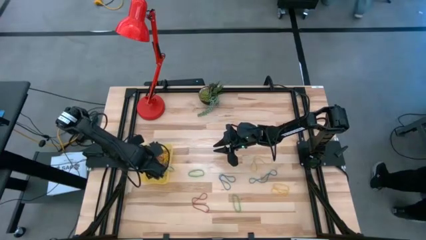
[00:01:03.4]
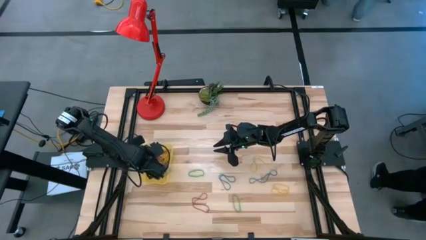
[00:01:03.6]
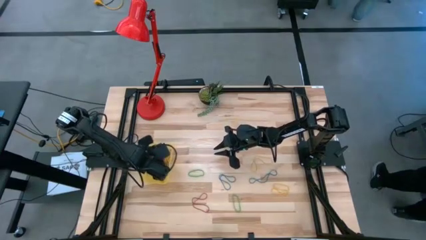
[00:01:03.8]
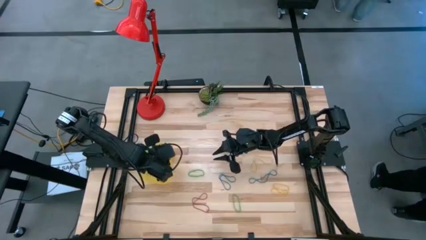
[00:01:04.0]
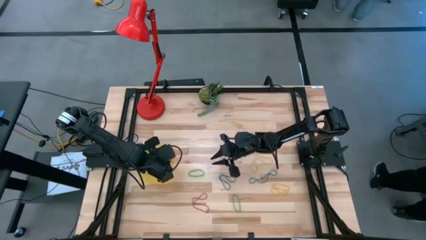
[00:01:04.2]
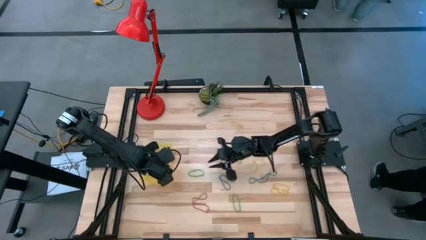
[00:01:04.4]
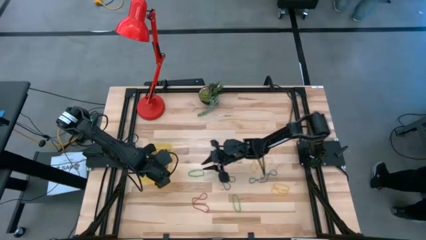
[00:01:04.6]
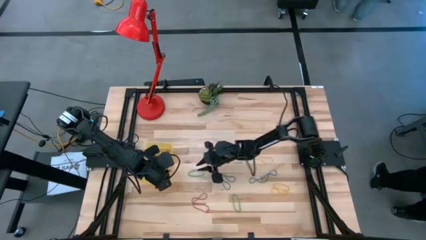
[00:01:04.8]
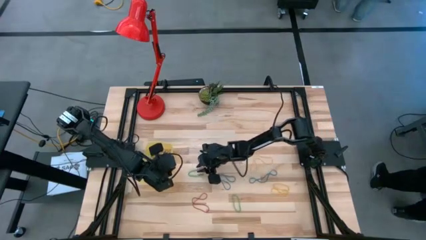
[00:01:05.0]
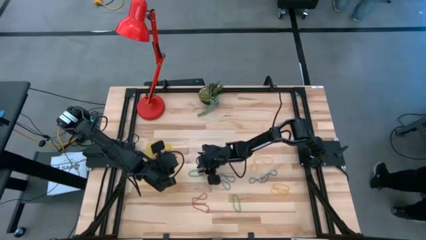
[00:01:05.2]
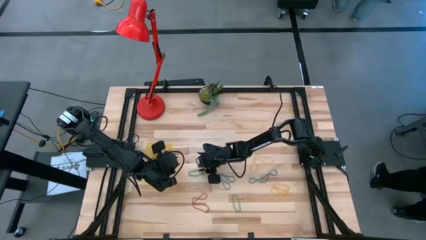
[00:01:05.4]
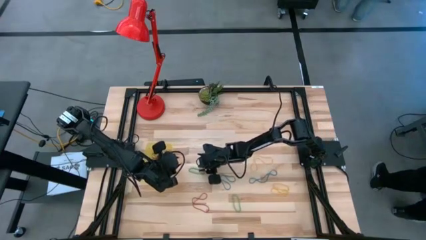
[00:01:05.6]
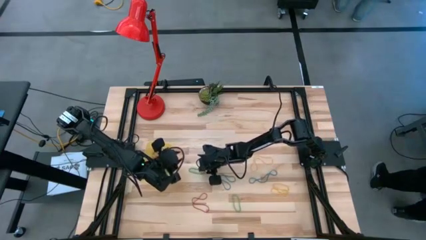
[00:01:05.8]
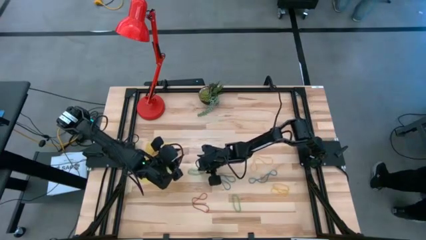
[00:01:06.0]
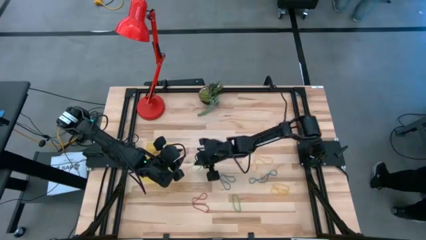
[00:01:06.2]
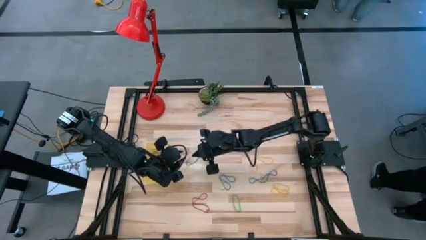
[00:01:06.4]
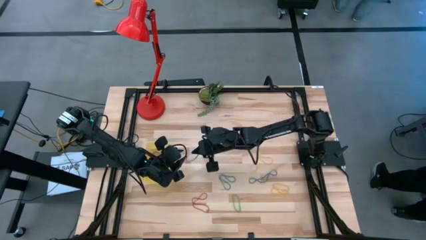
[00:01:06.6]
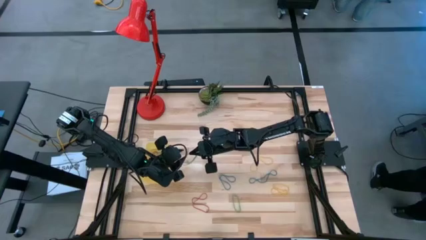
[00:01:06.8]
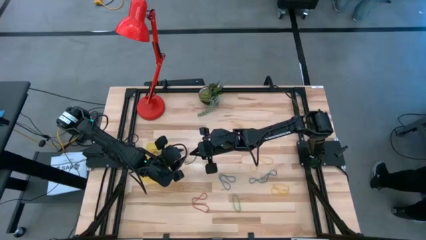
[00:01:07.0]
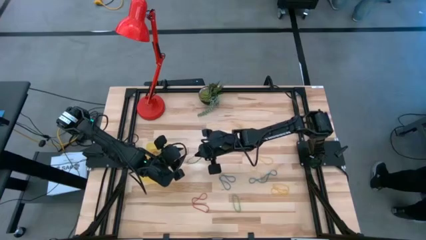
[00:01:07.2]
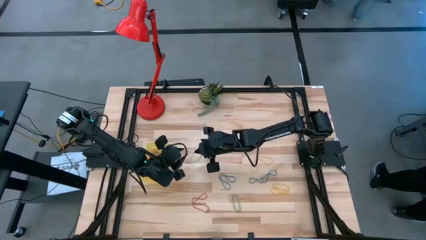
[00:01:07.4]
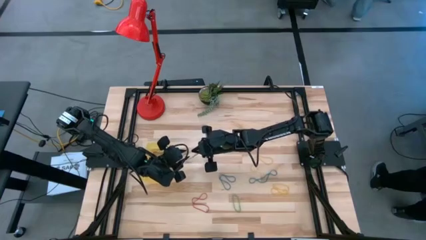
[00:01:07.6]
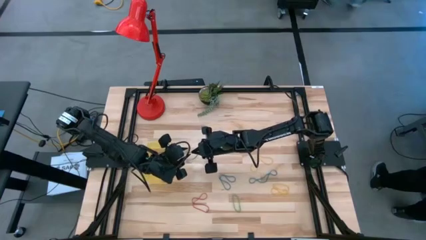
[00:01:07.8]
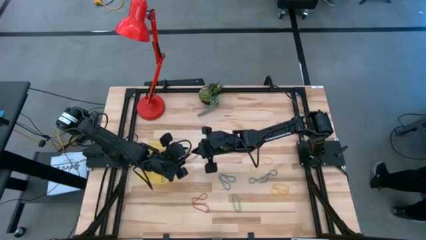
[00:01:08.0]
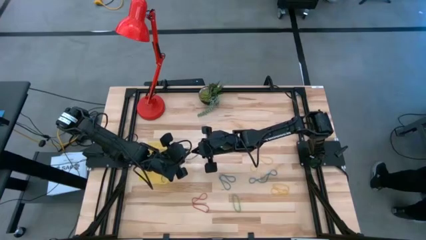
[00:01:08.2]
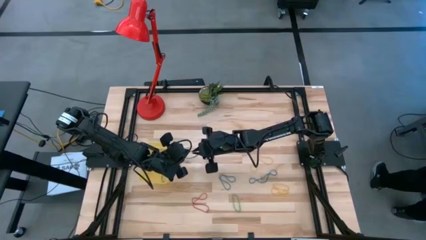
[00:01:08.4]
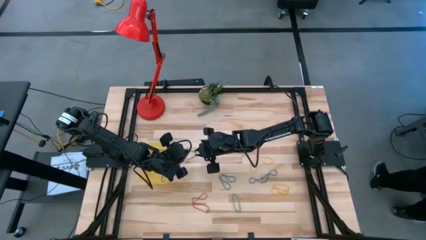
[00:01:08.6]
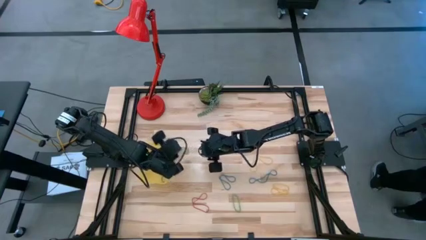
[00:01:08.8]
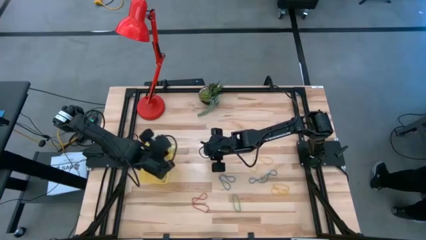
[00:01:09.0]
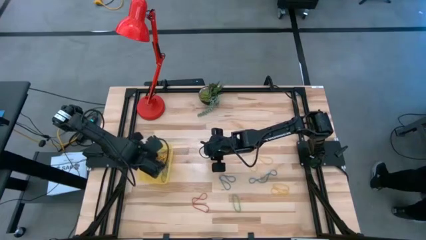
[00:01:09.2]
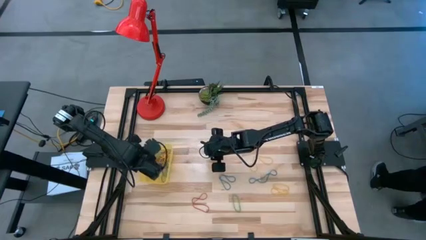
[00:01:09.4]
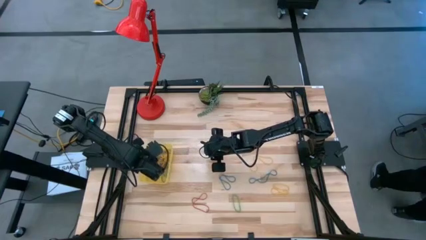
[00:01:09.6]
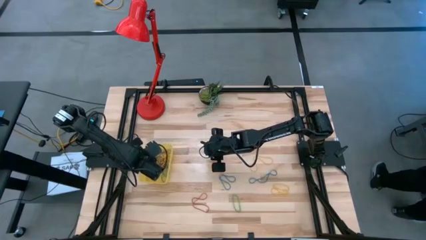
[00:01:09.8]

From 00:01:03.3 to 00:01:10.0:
Task: Pick and place items into bin
Put the green rubber band into the yellow bin

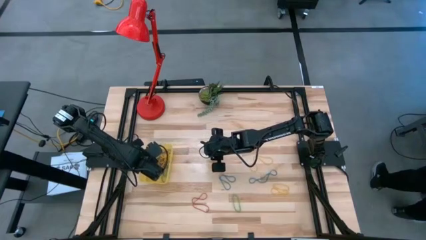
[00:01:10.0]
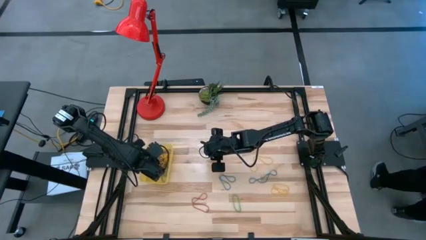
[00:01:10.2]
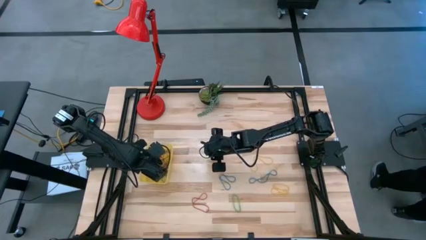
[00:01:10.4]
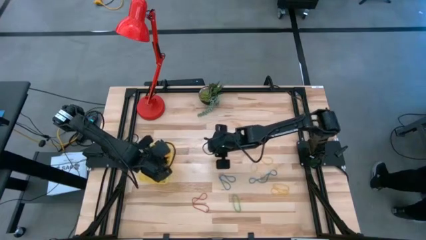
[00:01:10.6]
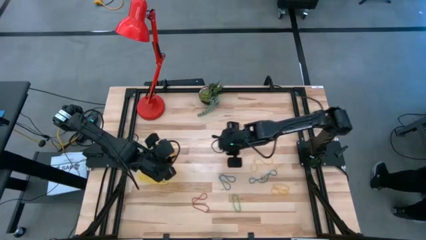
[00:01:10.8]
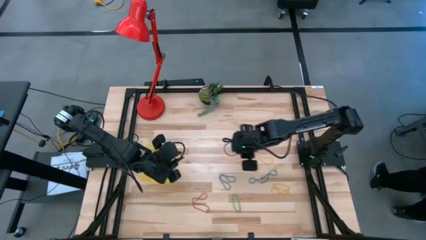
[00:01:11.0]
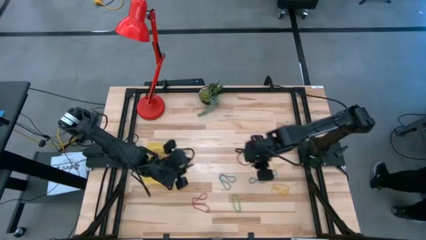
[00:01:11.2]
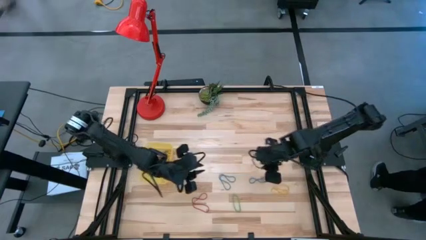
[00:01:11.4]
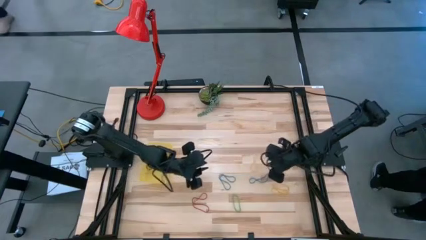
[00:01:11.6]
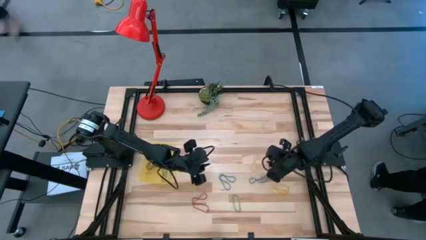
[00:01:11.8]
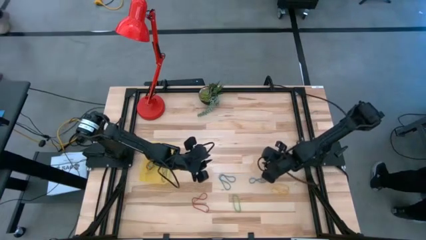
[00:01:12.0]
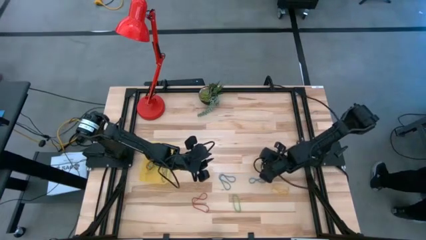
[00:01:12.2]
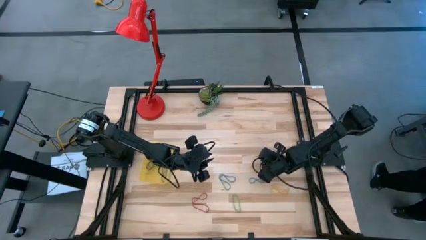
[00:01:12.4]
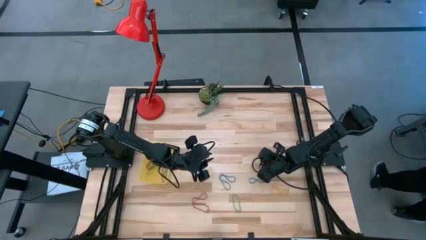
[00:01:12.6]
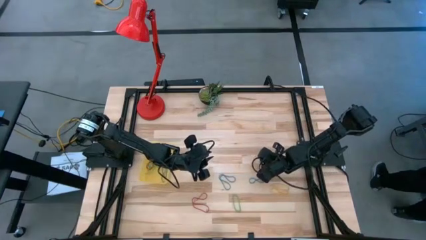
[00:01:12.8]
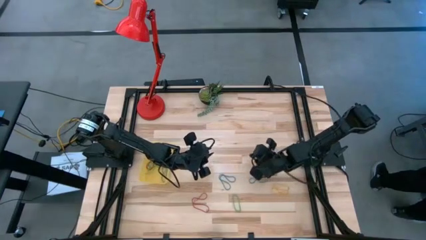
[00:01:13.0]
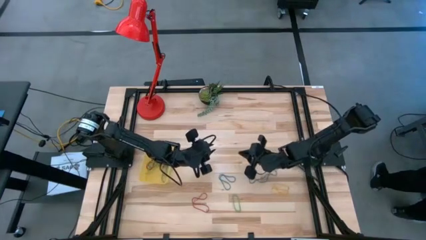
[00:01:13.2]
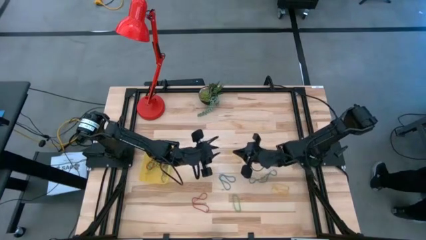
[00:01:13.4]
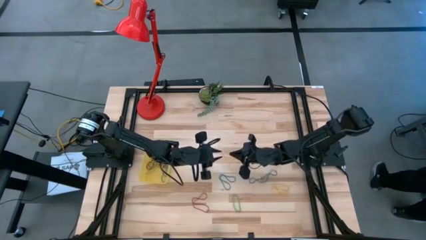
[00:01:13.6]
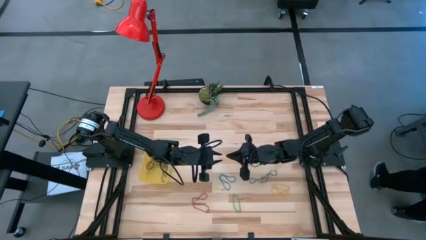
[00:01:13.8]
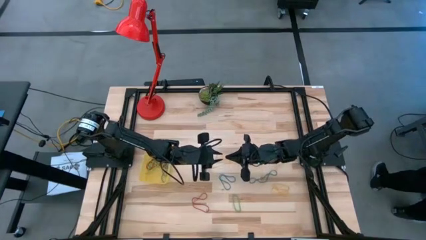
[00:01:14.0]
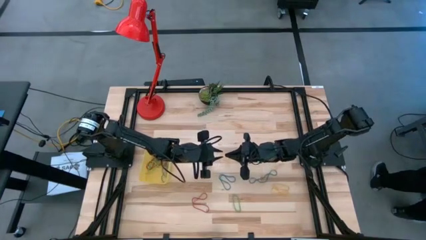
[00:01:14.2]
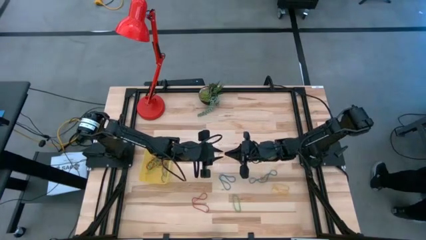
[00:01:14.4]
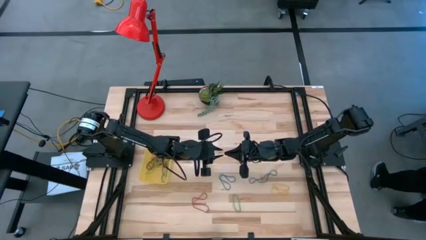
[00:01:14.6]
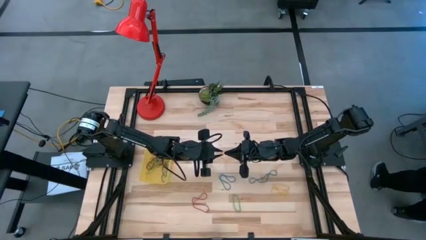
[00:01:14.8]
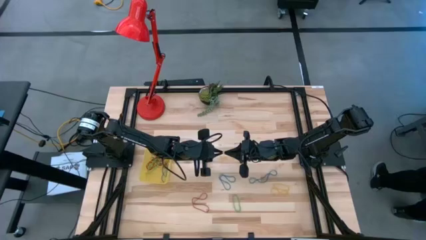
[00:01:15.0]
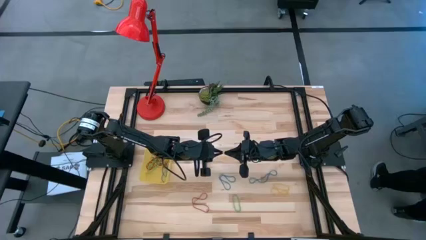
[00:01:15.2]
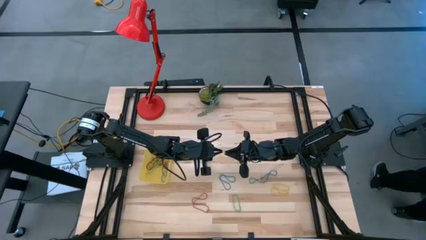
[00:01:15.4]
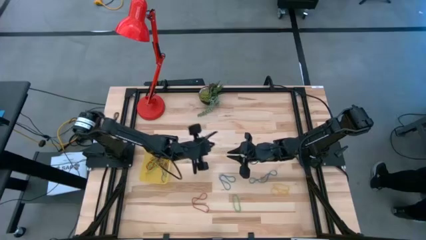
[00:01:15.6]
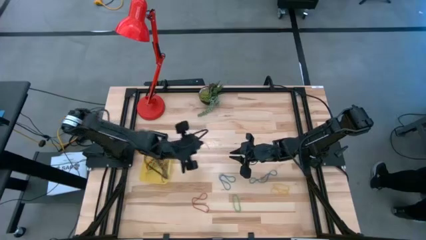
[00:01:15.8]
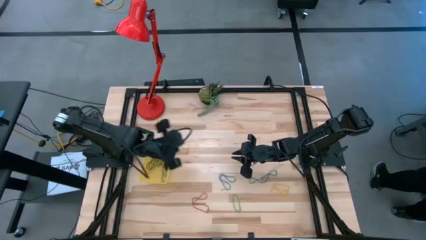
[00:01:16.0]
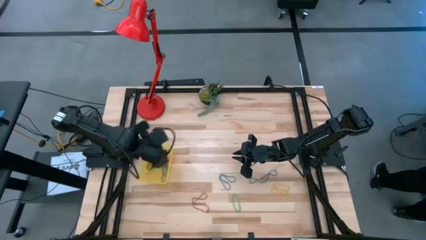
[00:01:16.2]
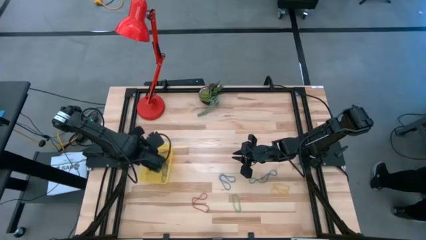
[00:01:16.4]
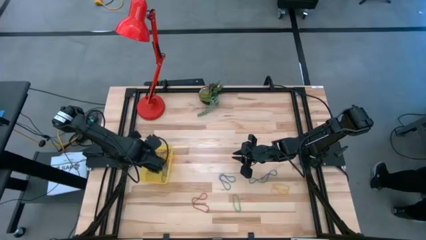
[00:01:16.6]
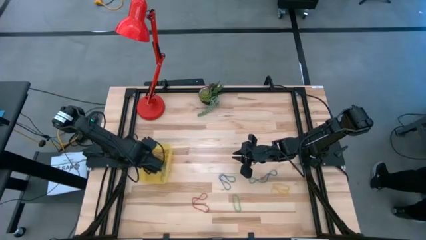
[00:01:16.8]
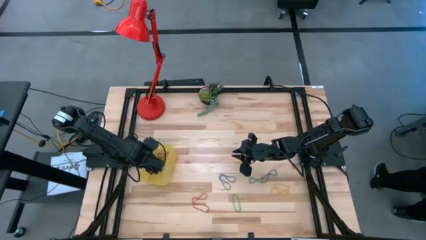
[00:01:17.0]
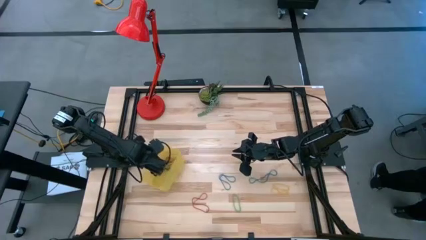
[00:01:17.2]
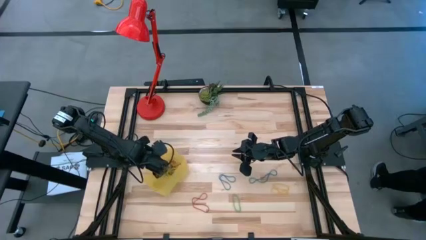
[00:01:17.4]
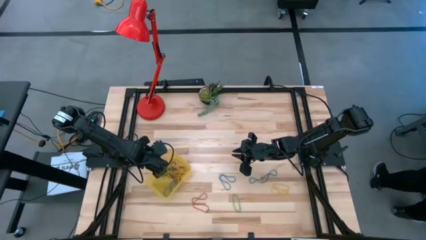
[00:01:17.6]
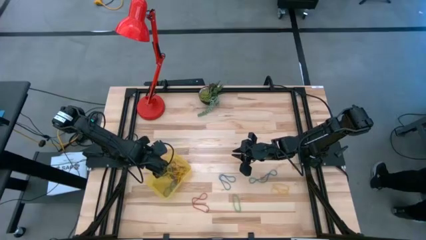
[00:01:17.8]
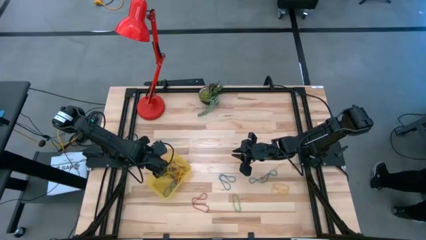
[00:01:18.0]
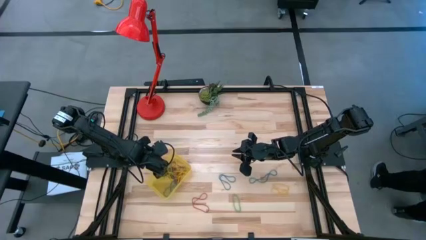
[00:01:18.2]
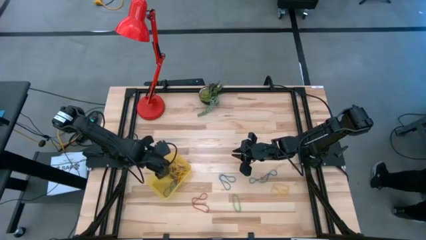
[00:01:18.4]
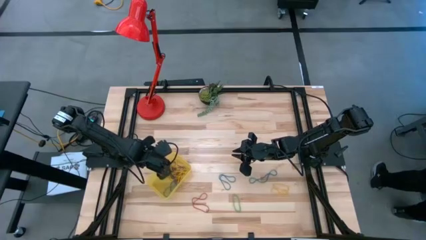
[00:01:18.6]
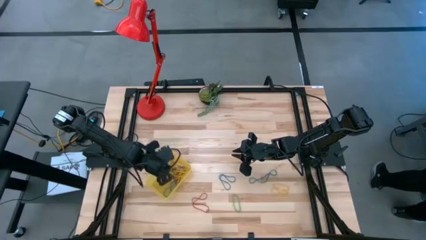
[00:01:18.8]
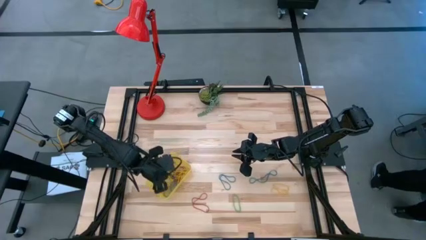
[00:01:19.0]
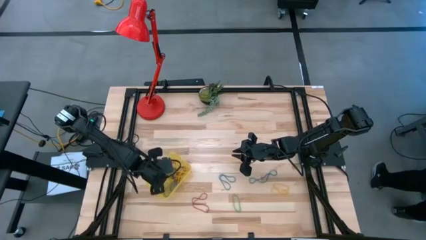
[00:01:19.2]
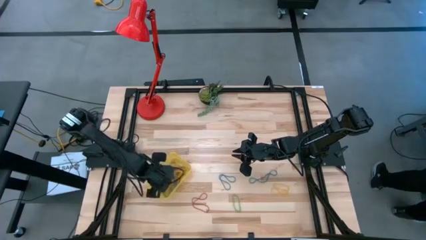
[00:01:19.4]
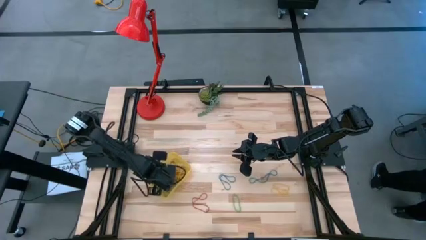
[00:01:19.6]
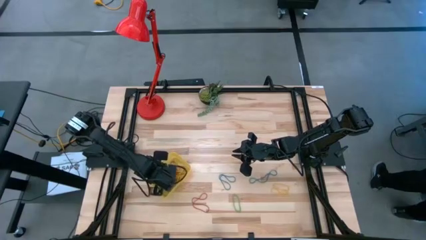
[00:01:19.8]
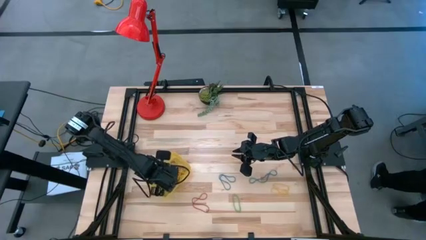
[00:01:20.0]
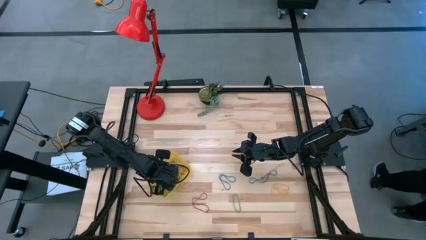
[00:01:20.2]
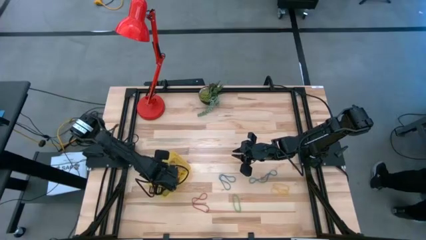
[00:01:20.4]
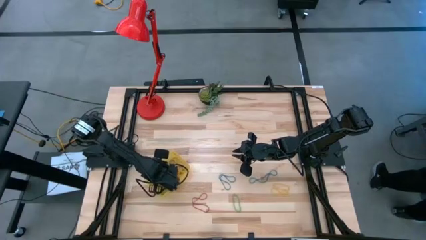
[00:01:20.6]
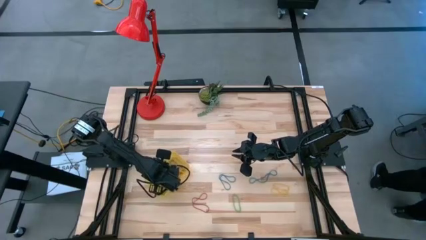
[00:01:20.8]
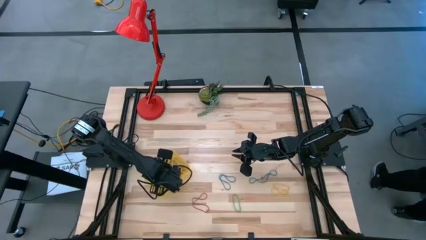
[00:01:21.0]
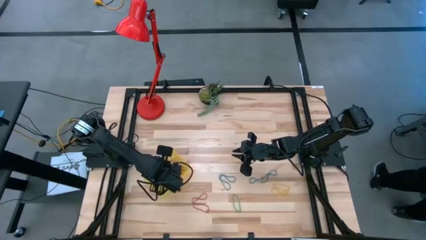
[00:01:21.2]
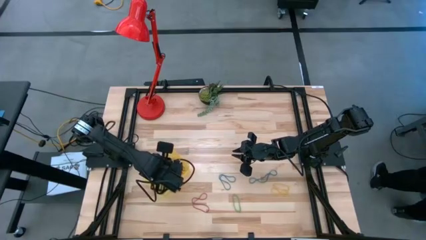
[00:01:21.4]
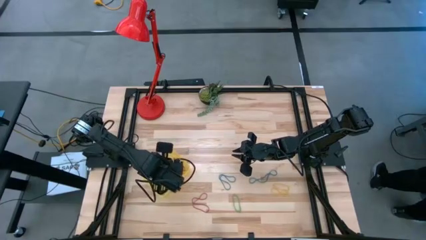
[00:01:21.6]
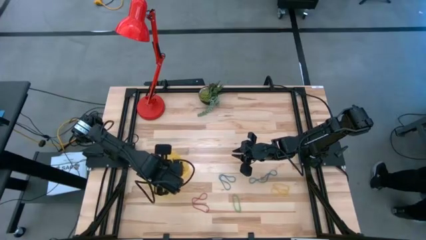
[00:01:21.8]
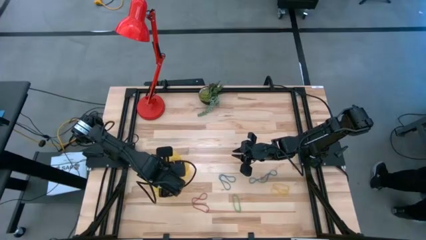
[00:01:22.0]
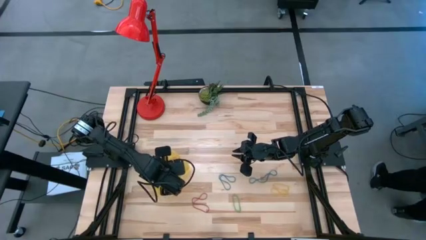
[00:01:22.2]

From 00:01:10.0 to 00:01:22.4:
Put the yellow rubber band into the yellow bin
